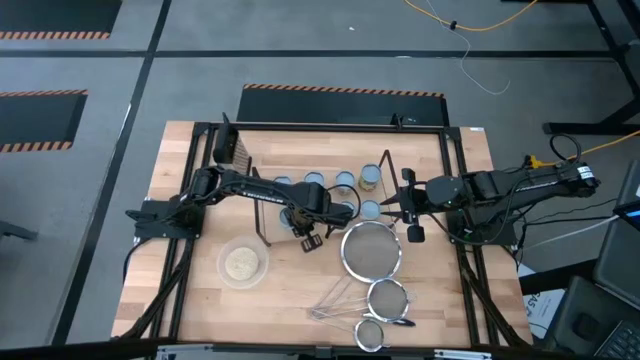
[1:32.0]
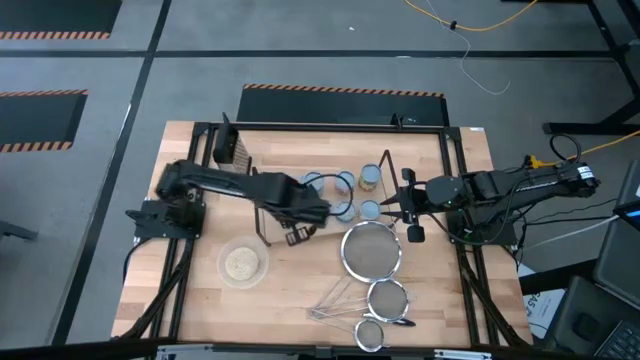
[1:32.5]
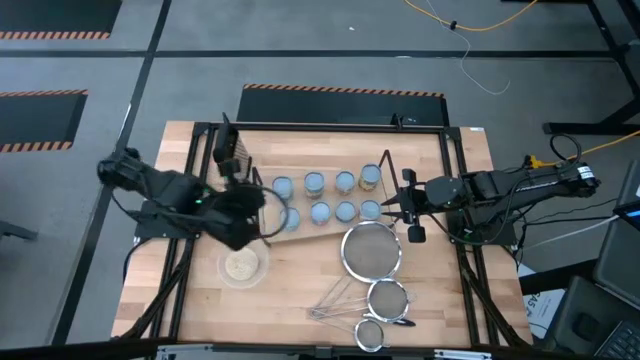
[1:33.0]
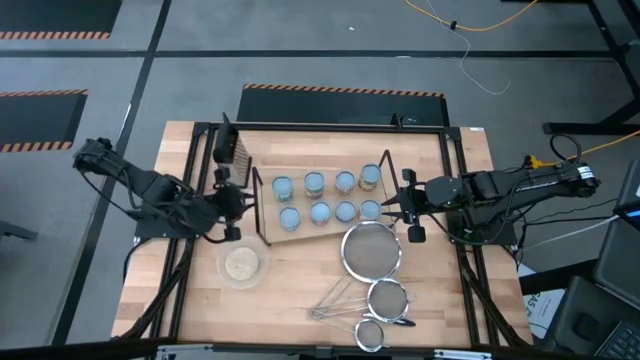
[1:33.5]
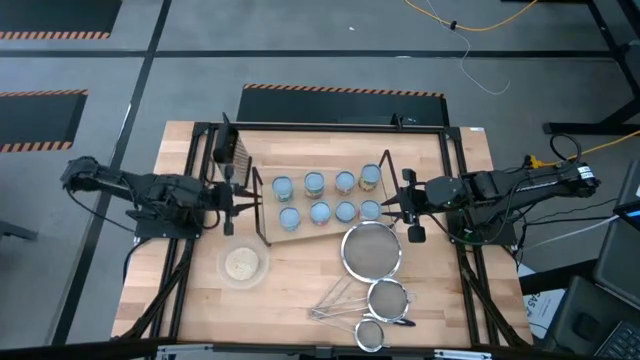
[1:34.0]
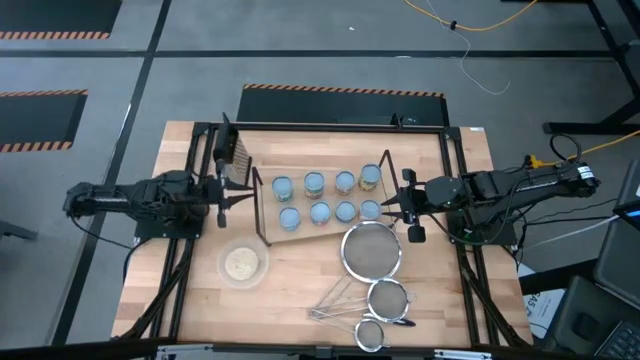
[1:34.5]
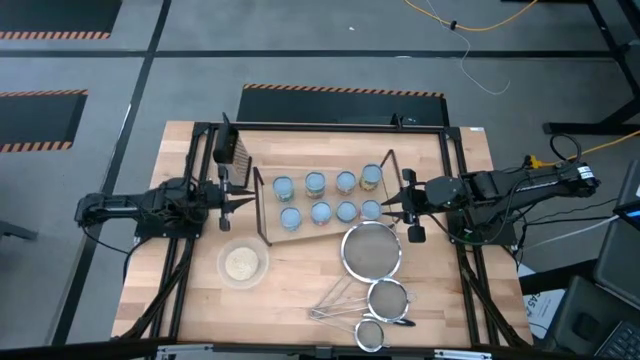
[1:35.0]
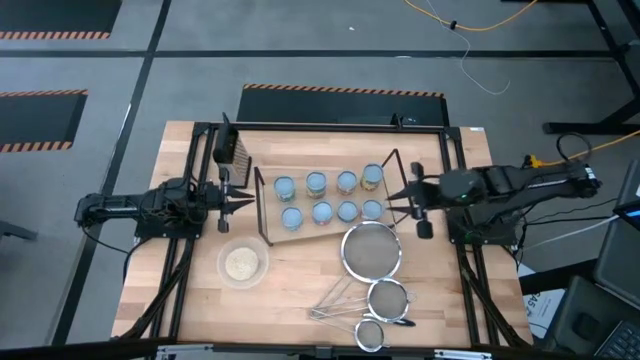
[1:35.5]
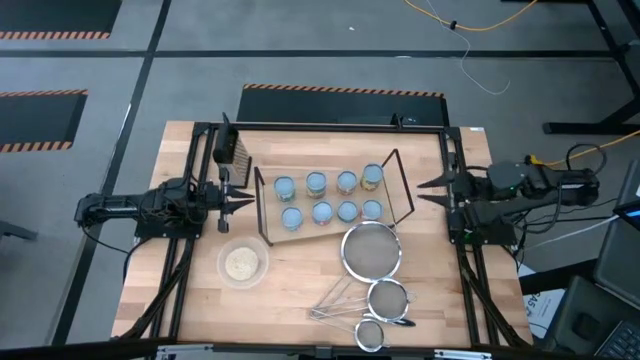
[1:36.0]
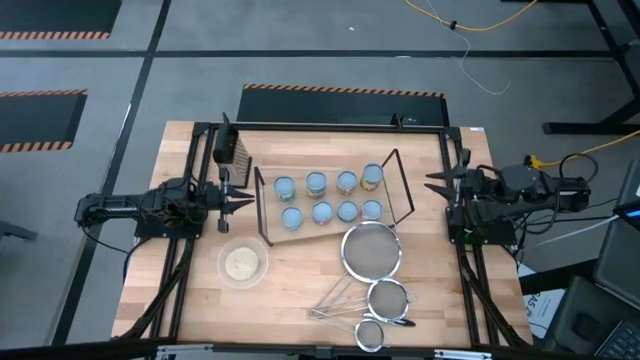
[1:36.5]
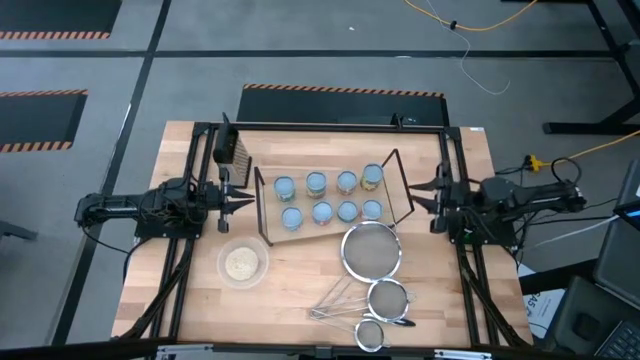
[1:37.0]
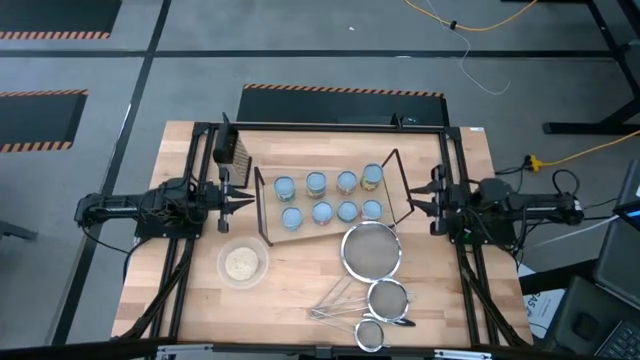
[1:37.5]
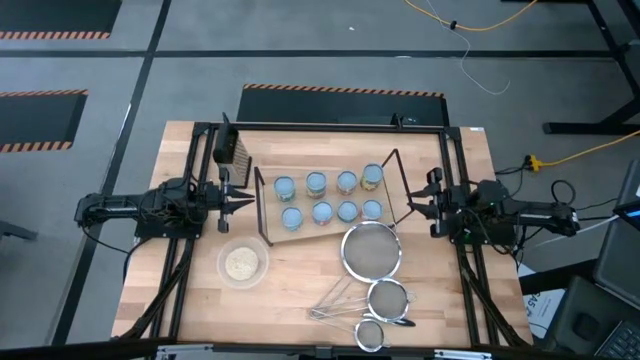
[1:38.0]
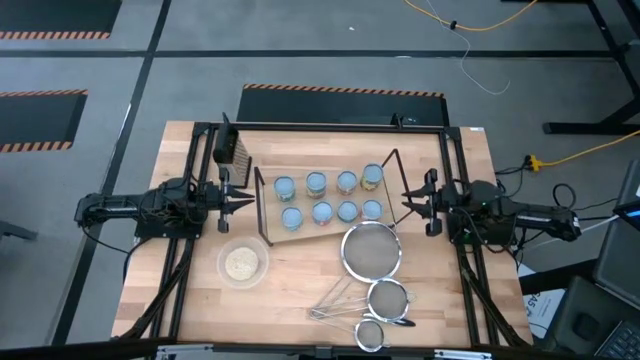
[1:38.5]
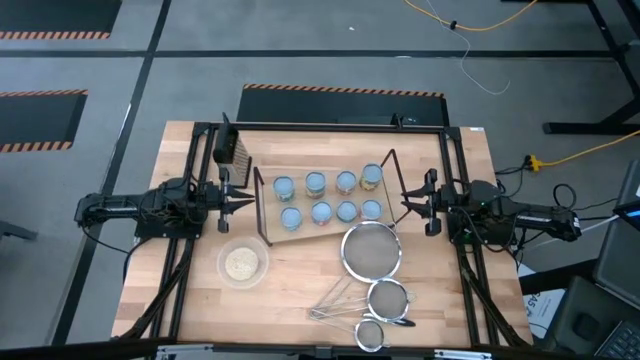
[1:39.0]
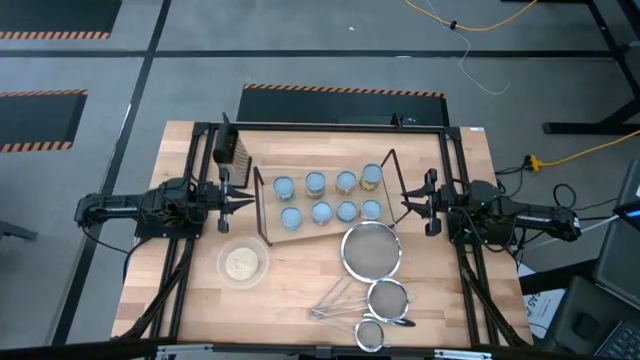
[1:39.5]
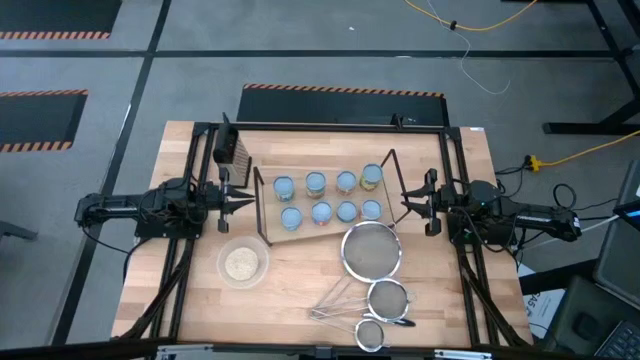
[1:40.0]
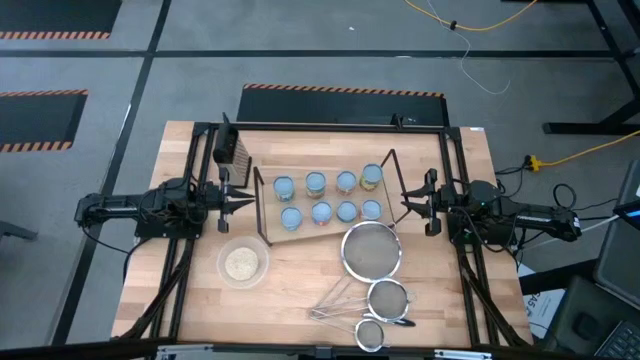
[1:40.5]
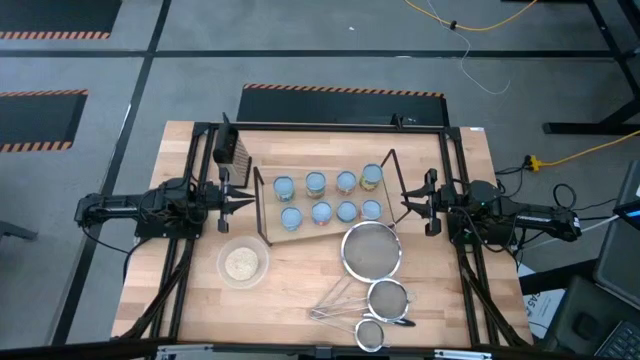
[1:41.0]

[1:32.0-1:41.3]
Task: Pick and place cans onto a shelf
Return to Home Position

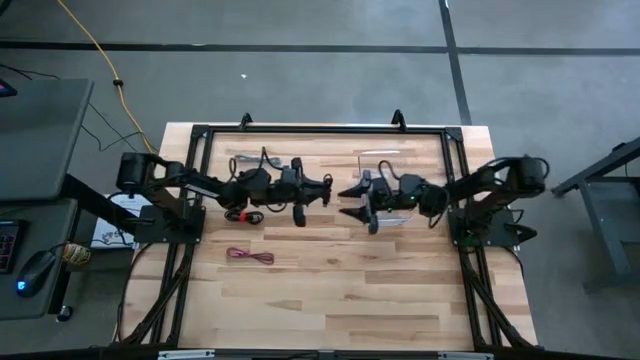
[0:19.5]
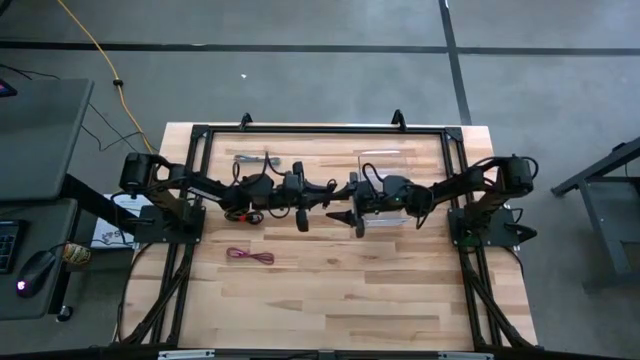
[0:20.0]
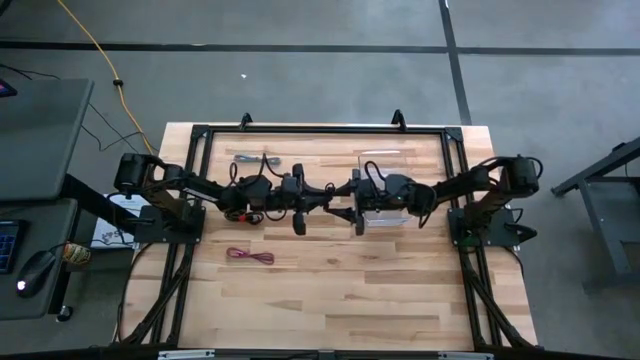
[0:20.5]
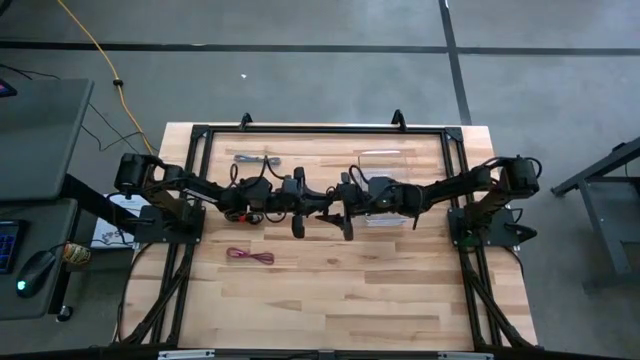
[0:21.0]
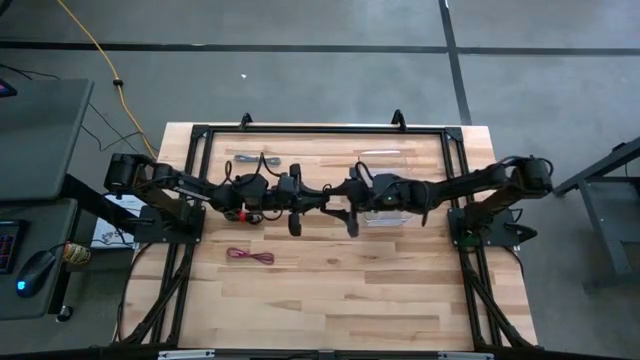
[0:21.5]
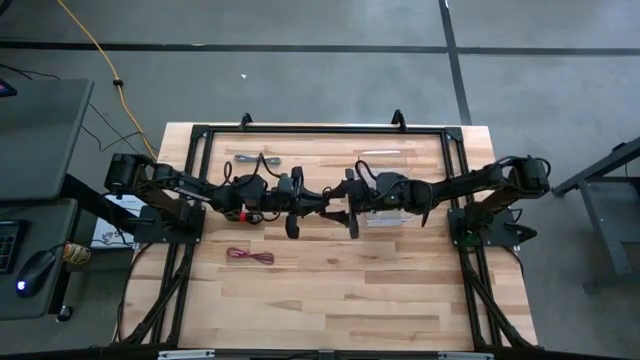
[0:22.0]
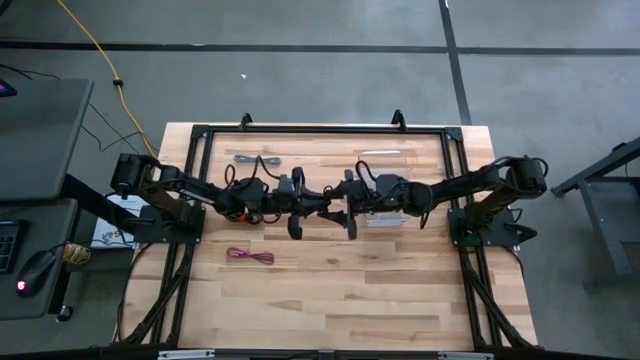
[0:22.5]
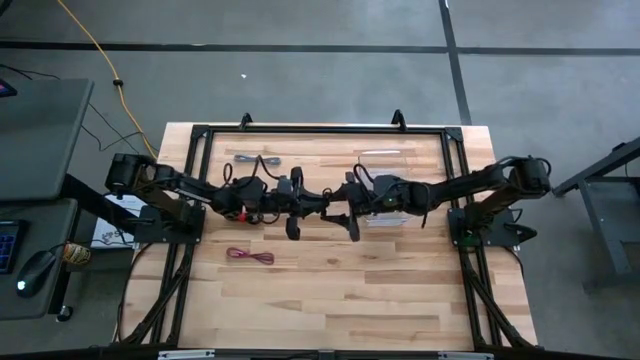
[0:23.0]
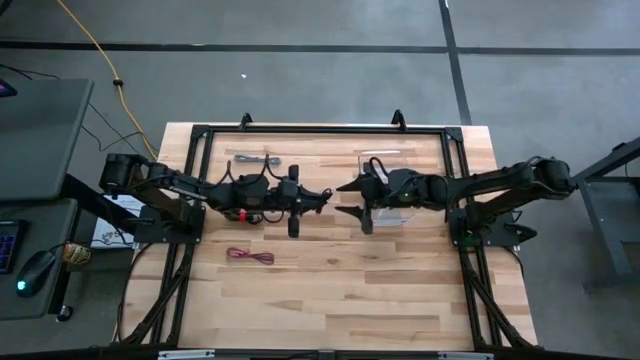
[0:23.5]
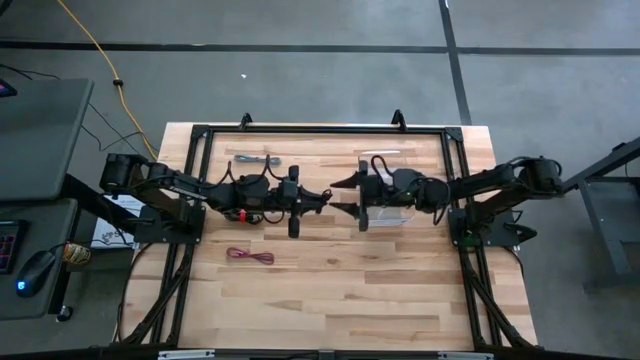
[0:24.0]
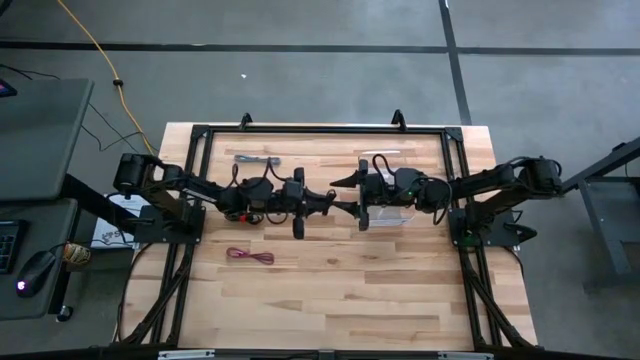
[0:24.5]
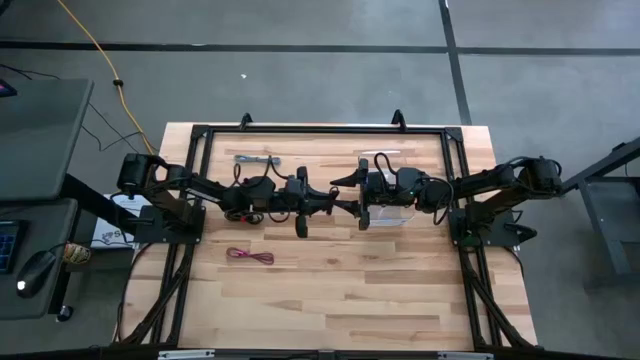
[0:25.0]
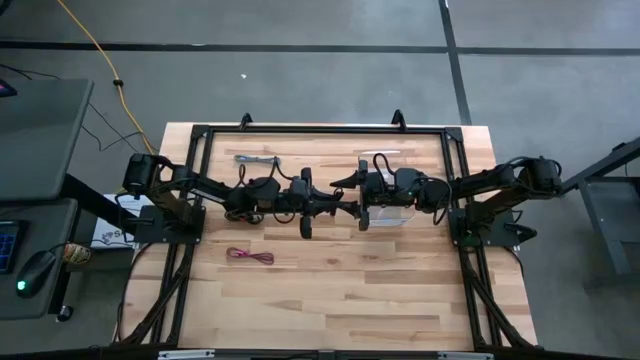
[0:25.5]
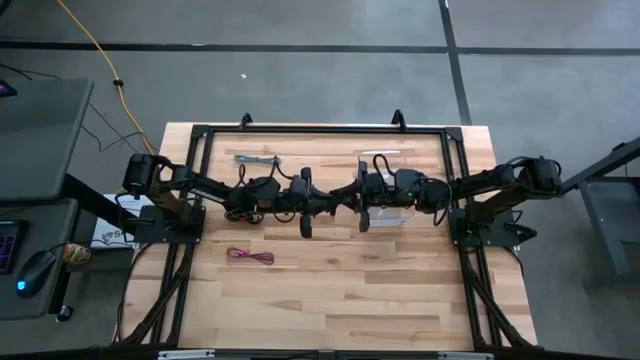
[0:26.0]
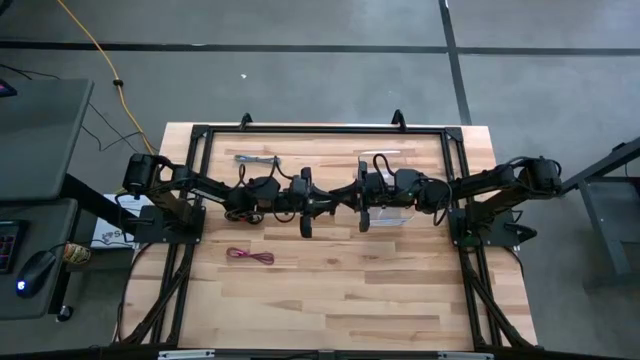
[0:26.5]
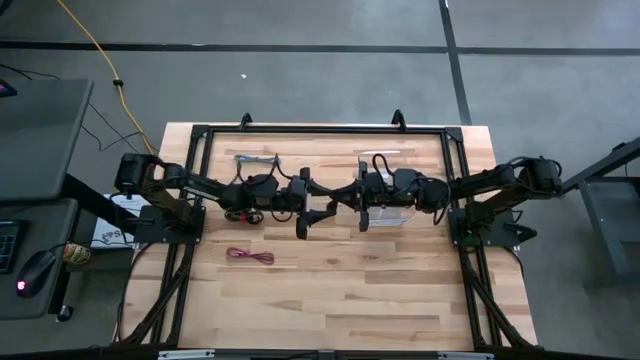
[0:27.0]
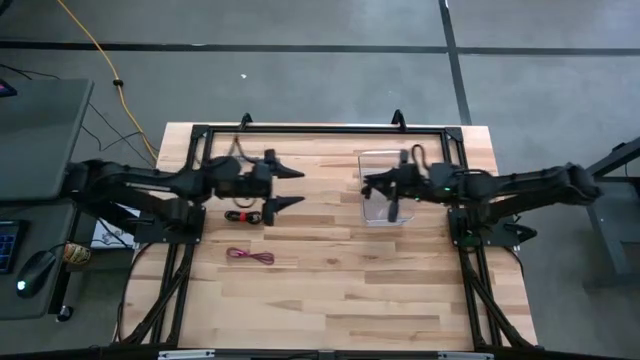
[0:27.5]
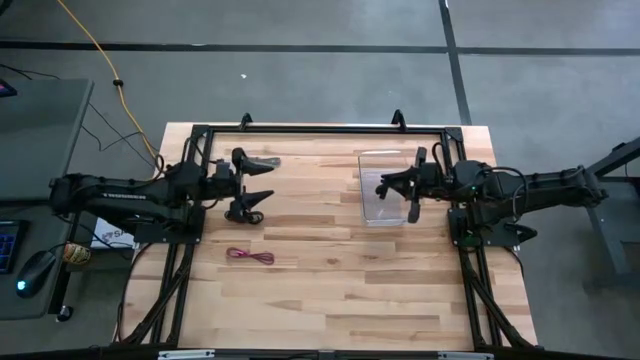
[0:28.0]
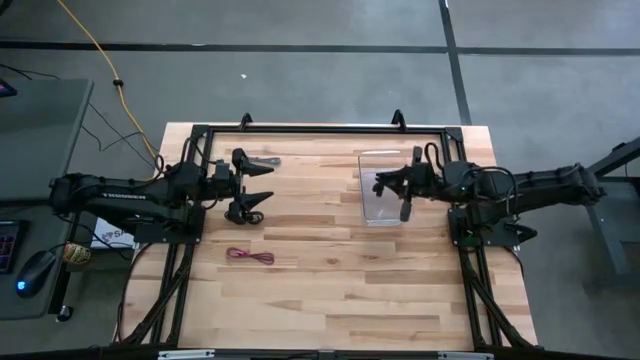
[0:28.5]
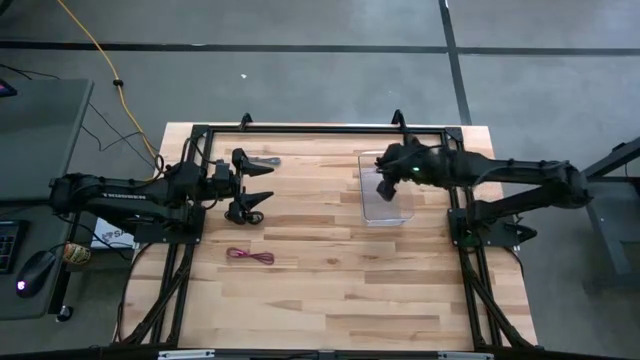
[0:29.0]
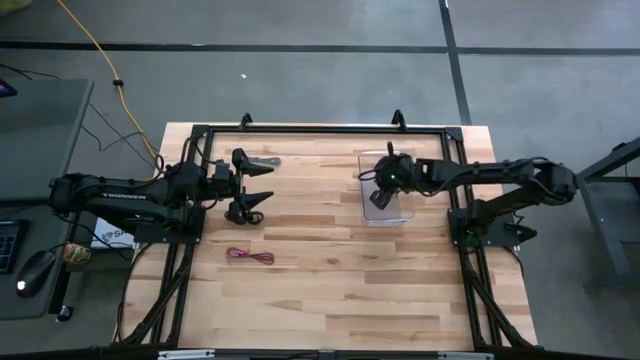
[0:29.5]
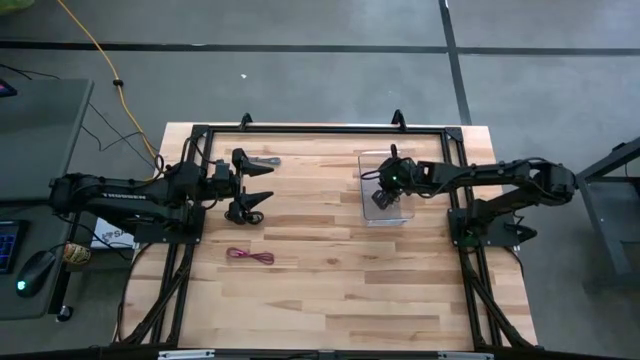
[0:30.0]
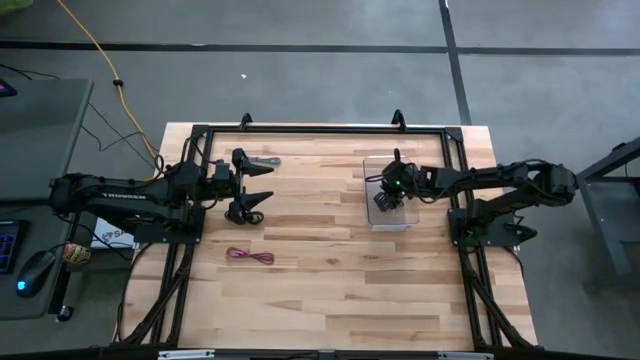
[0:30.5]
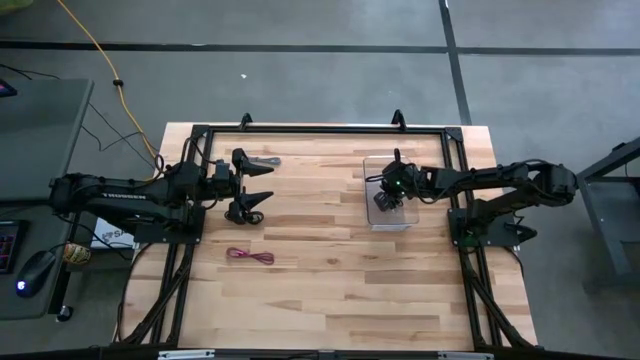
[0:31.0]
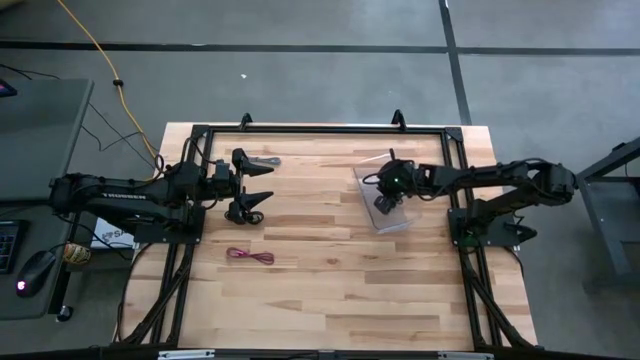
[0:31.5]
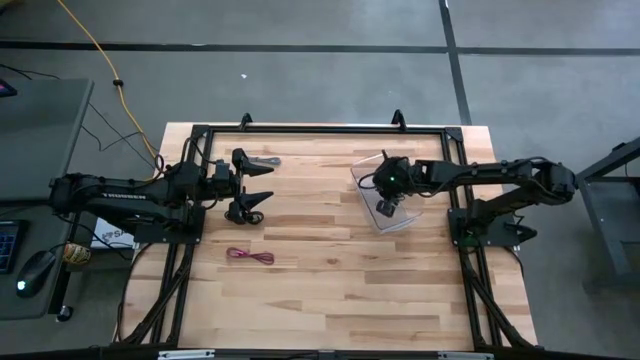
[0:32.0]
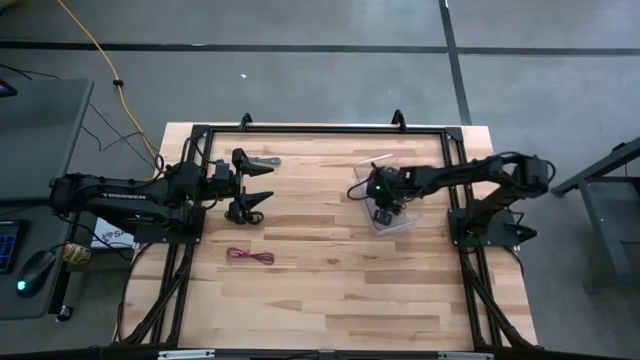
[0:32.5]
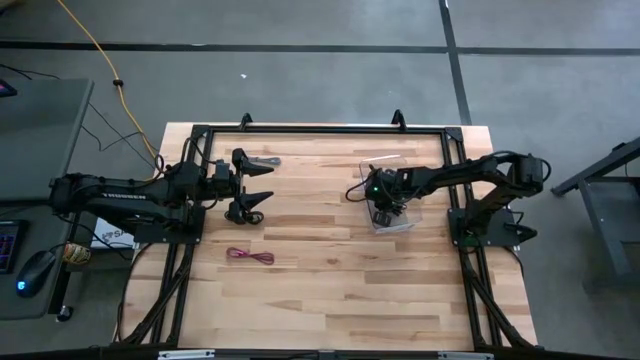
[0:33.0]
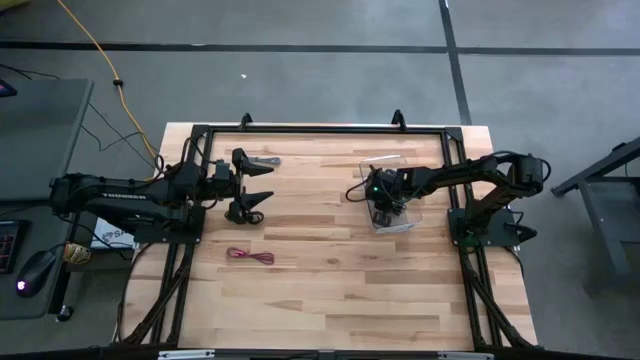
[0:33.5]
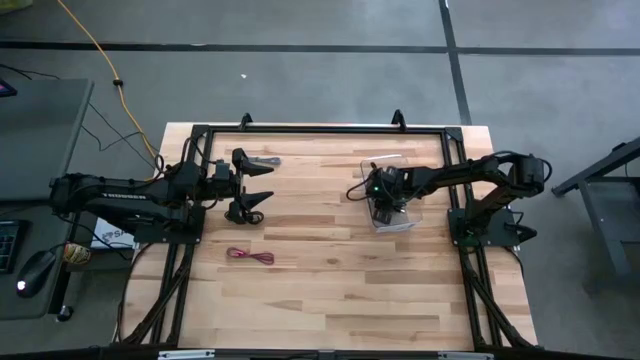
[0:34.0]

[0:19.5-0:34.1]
Task: Pick and place USB-C Cables
Put the black cable charger into the transparent bin
